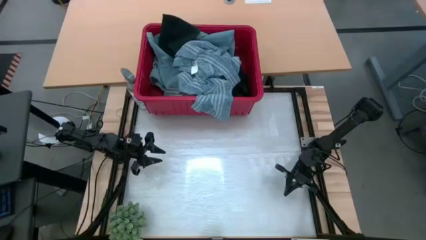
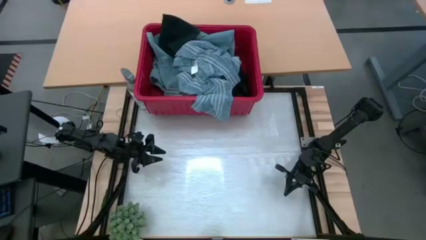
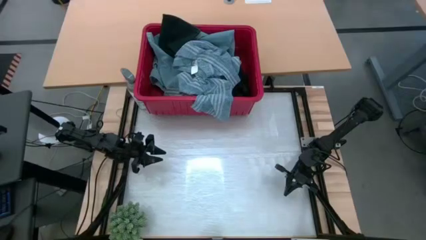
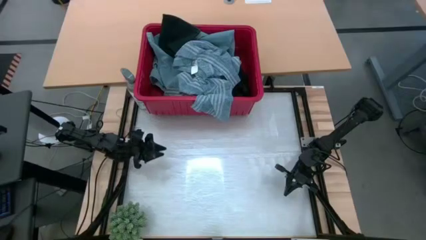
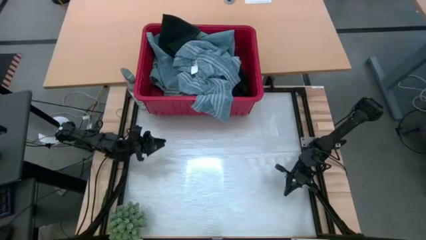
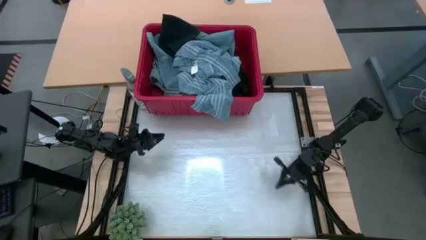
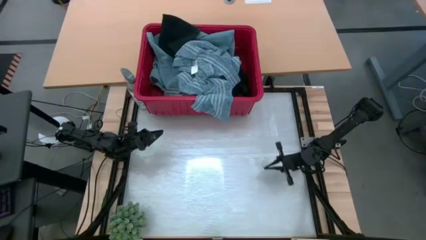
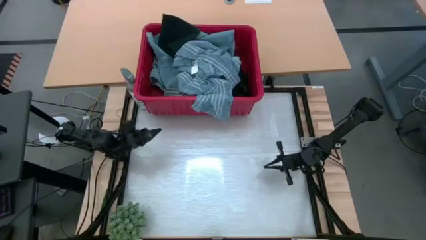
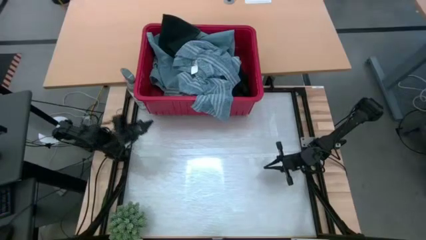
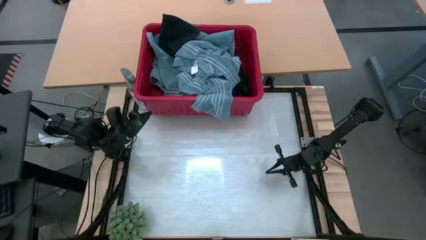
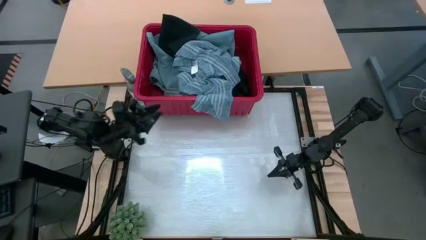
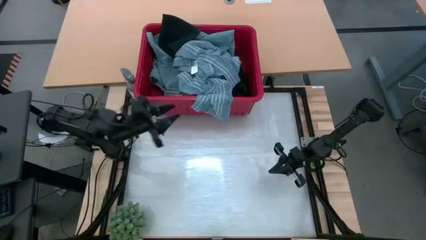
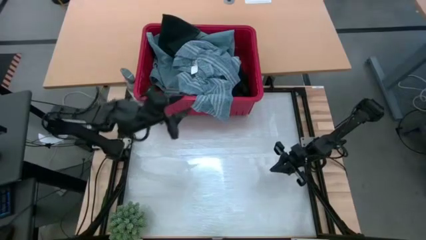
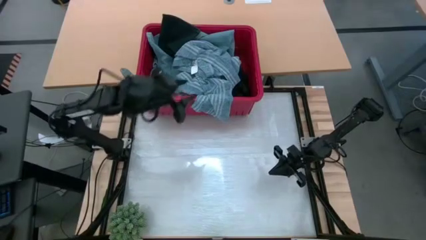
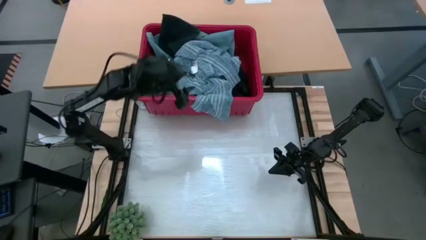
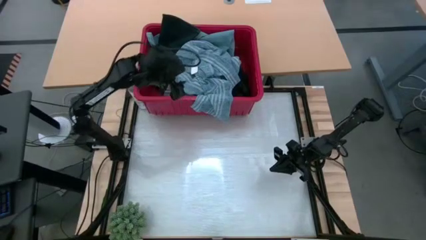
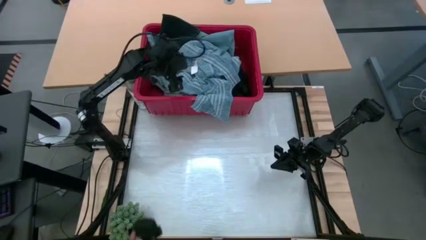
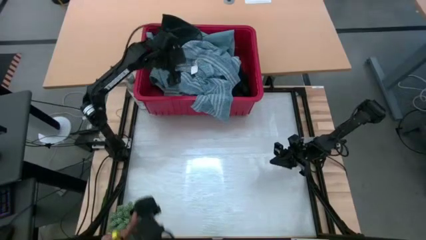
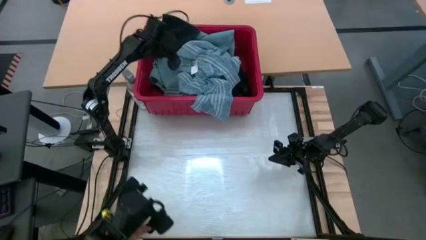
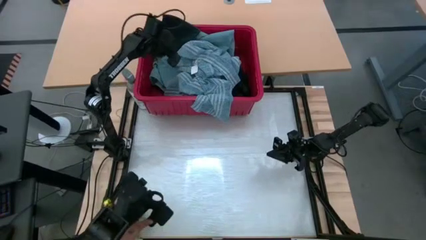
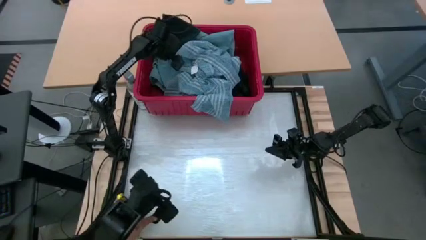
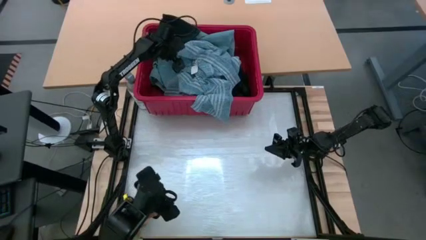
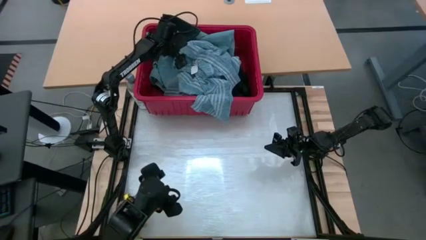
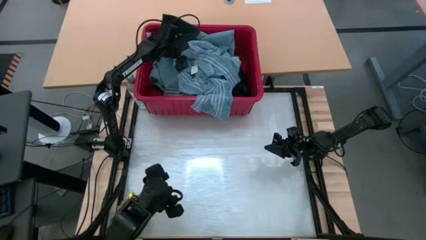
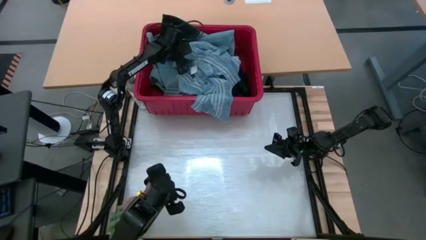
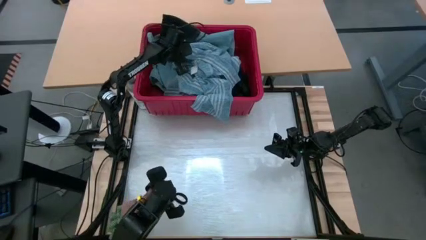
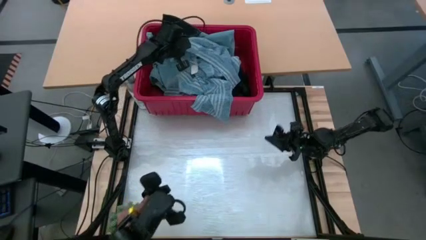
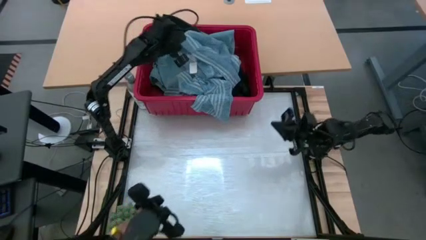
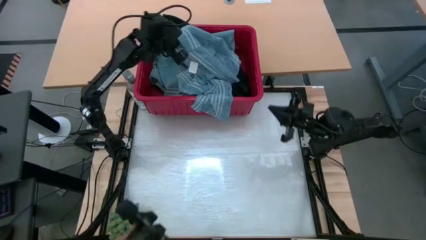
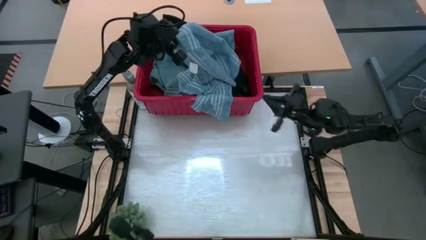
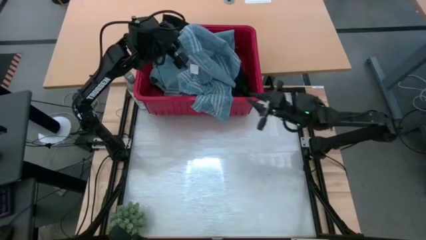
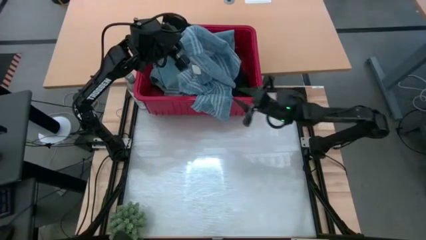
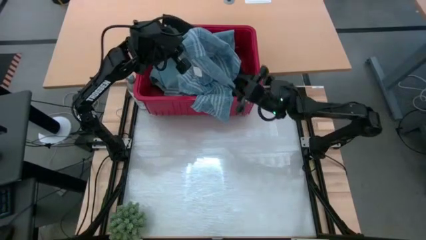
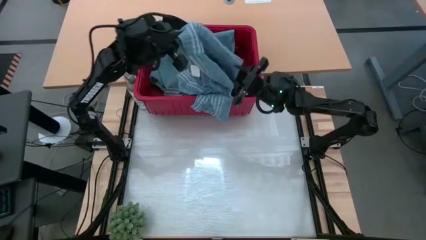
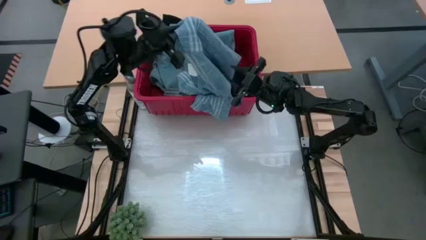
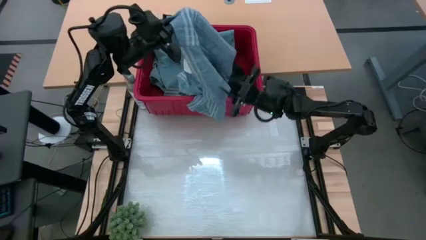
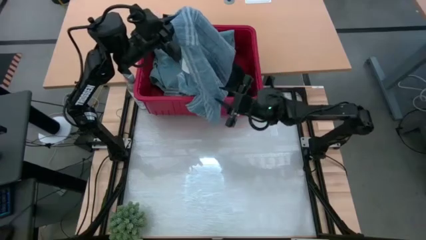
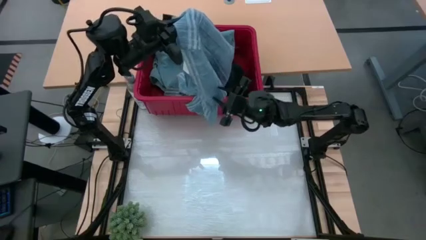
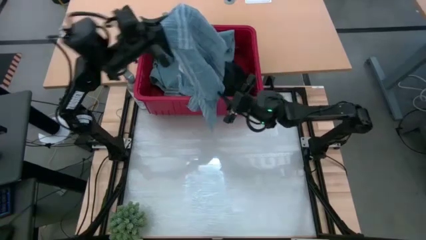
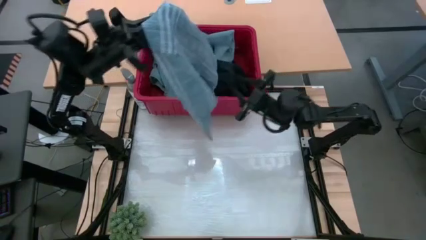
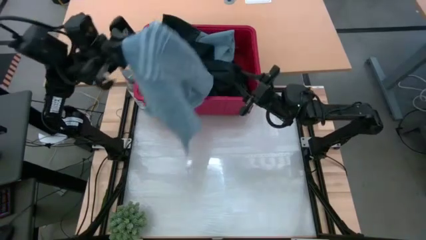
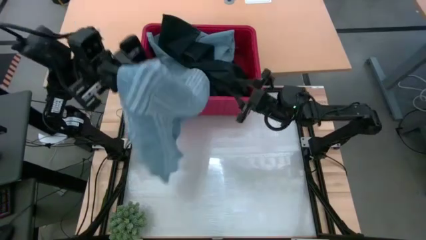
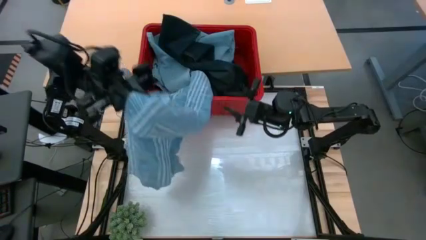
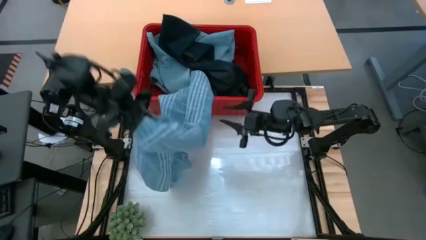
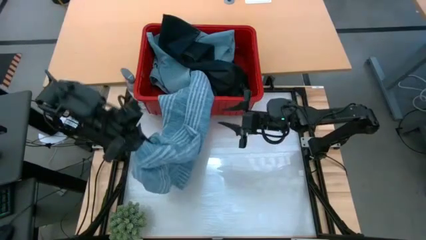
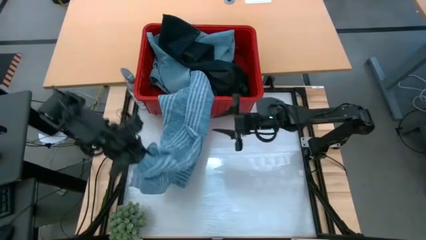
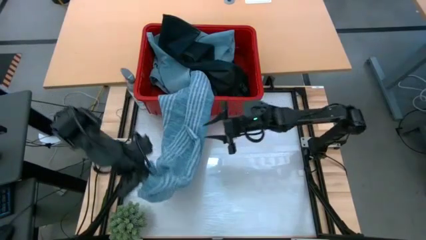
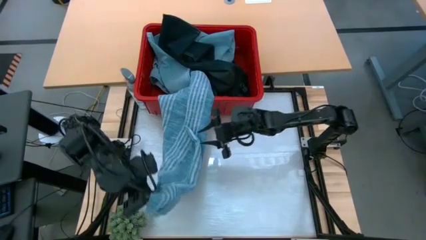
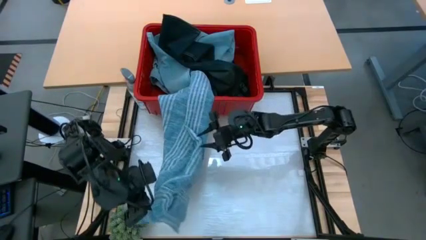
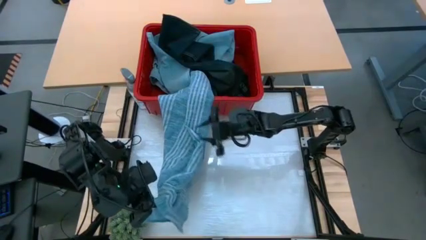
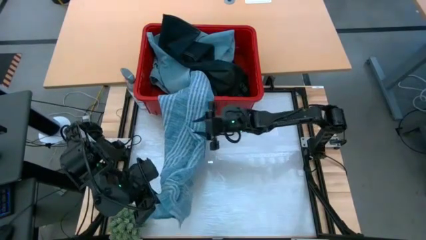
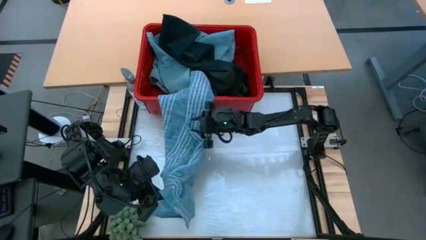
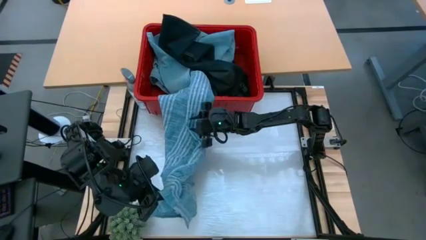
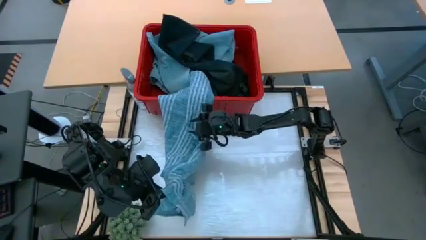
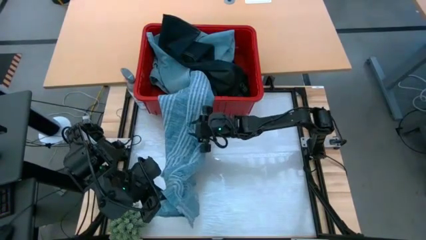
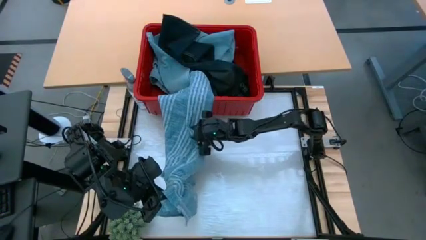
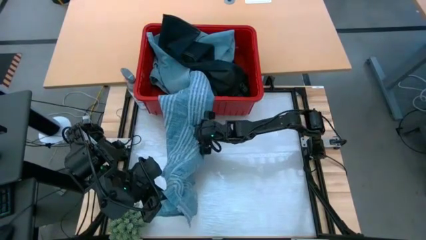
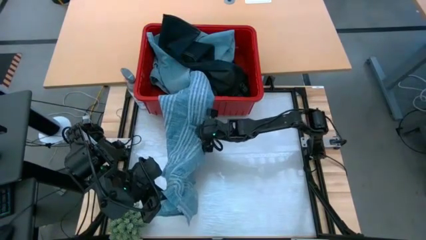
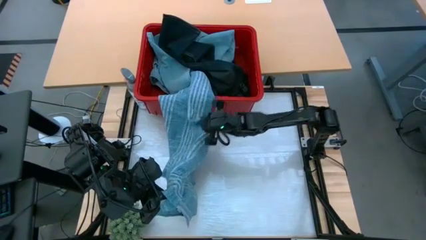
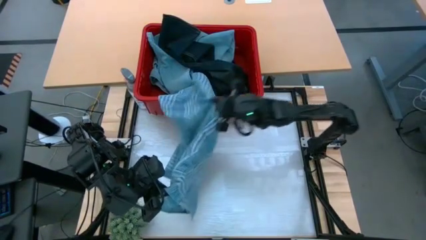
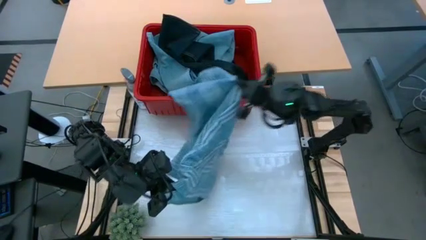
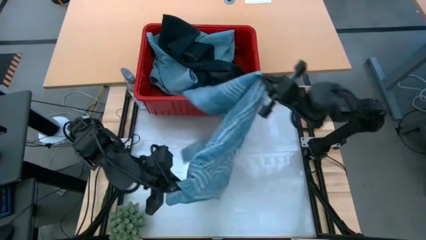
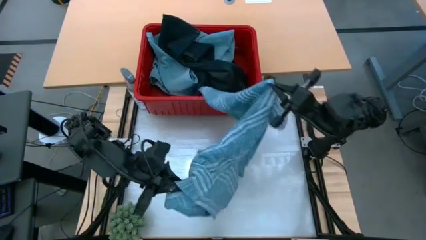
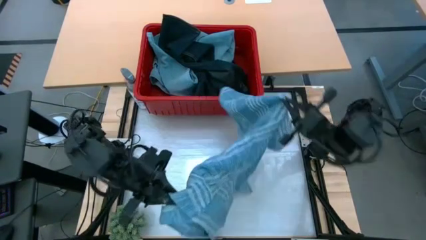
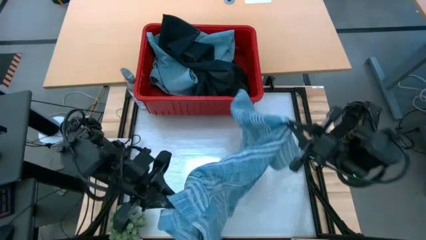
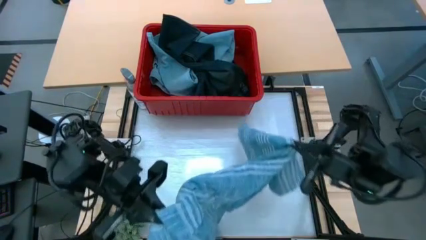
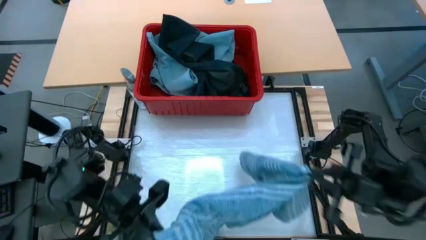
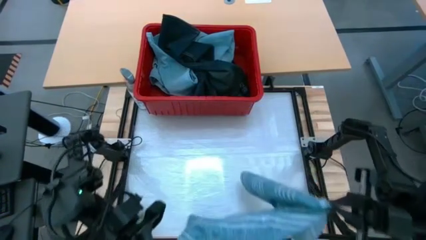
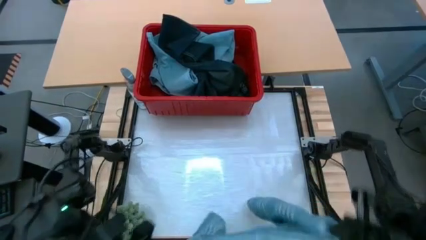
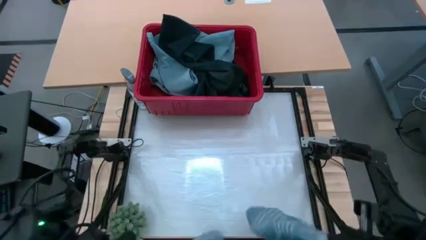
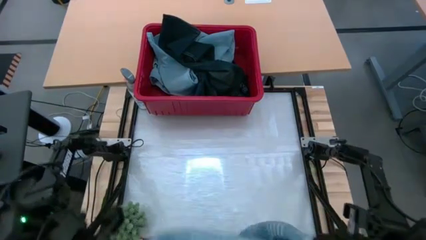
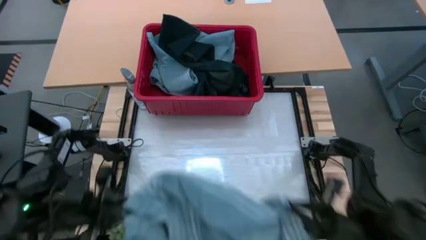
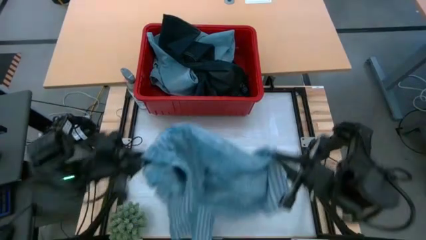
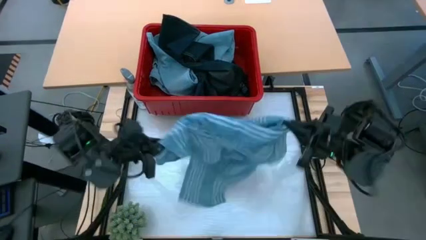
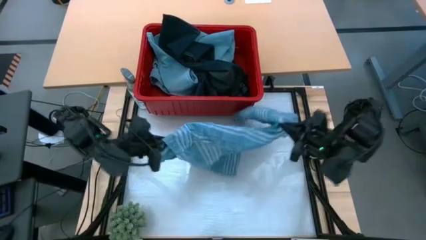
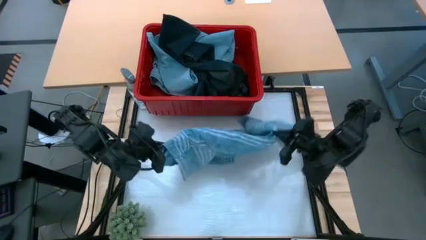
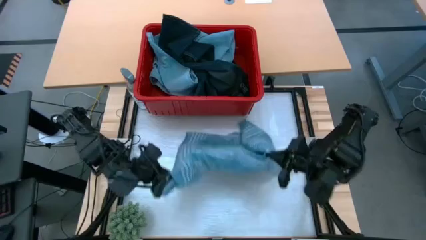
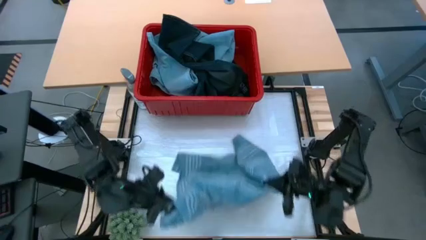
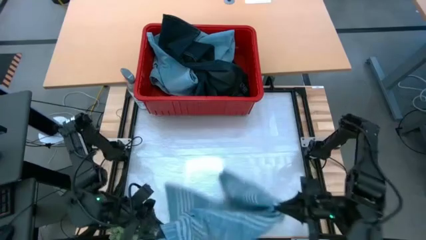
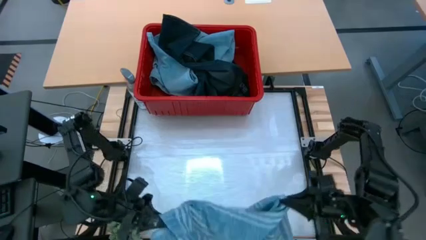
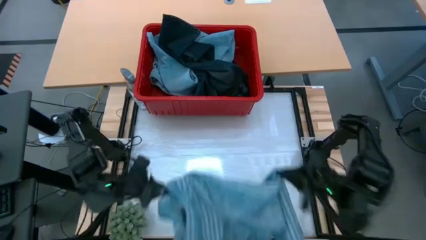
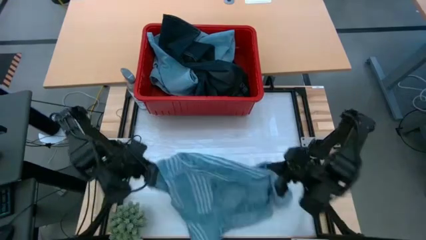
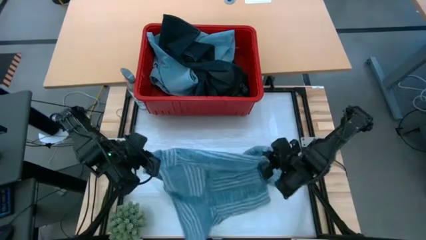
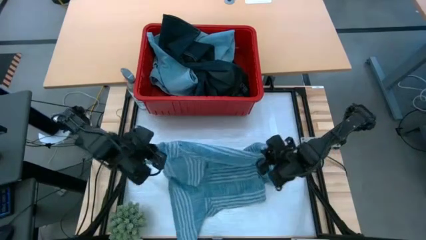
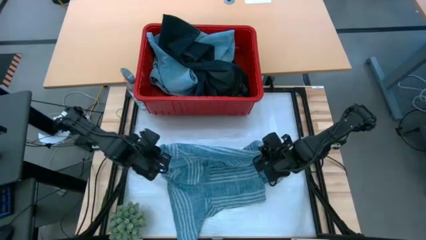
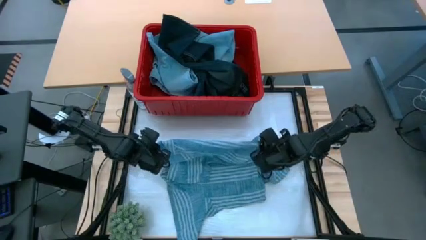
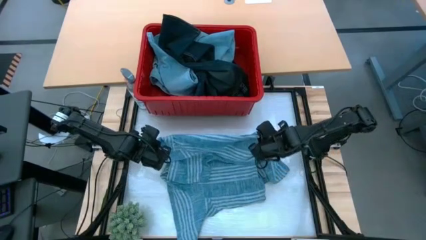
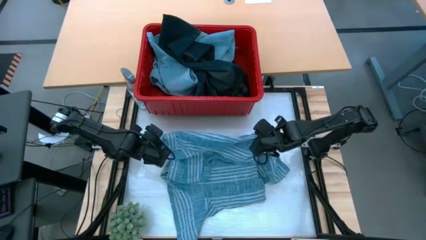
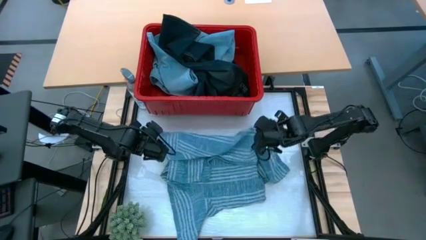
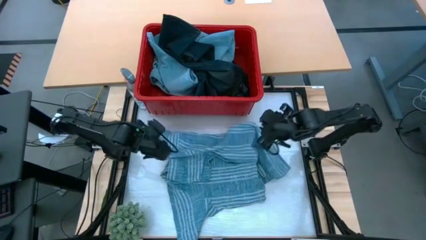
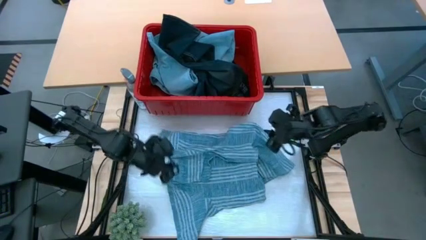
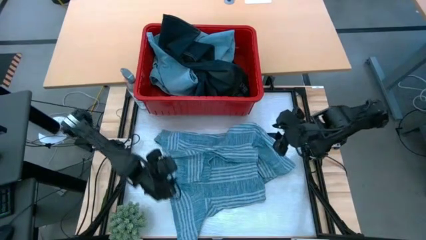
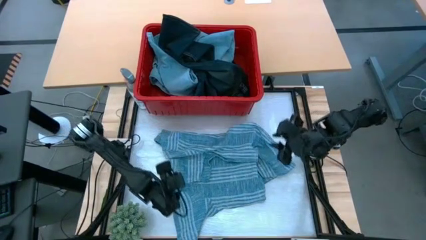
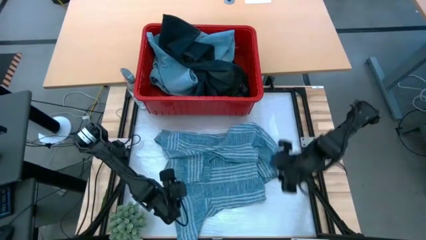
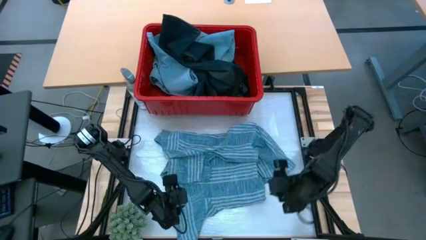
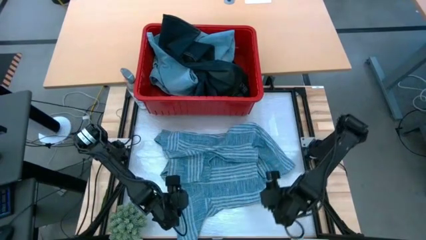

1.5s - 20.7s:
Task: Fold Laundry from Bin
Fold the light blue shirt
